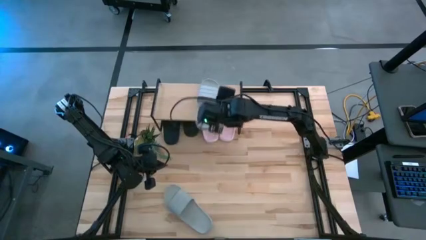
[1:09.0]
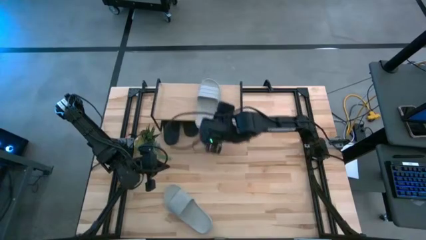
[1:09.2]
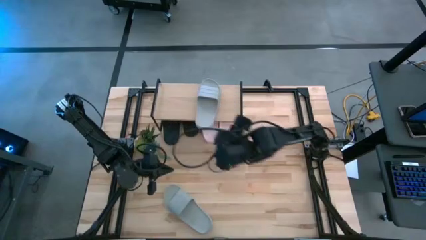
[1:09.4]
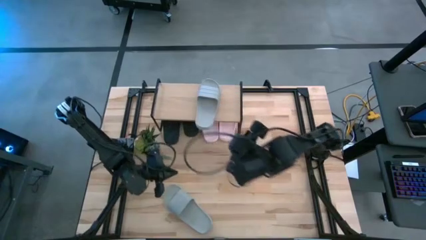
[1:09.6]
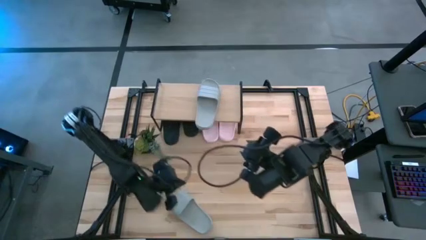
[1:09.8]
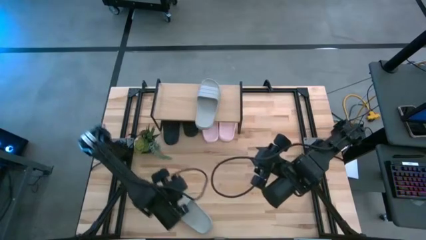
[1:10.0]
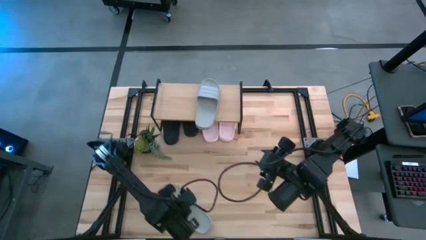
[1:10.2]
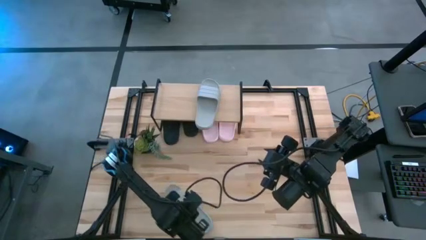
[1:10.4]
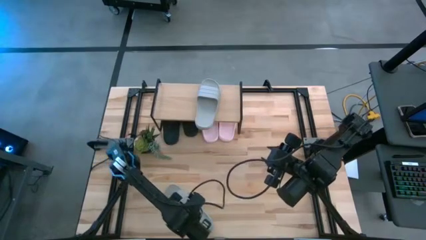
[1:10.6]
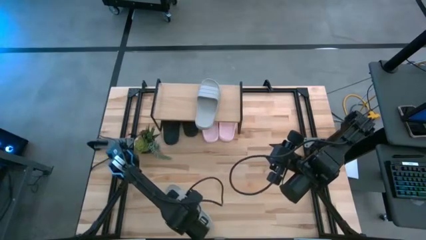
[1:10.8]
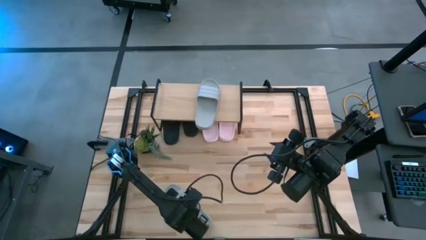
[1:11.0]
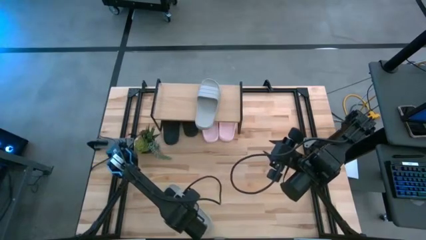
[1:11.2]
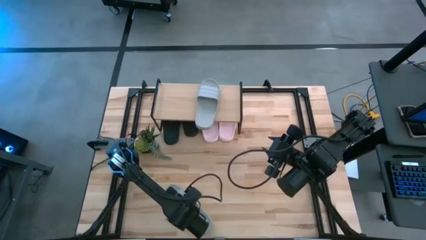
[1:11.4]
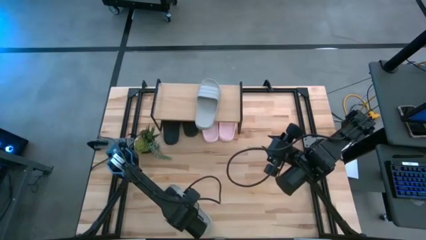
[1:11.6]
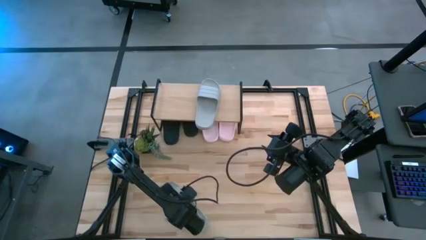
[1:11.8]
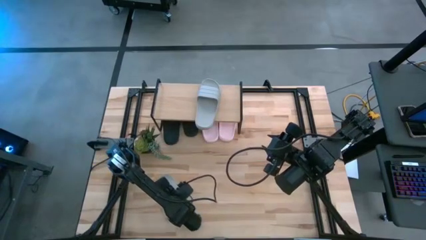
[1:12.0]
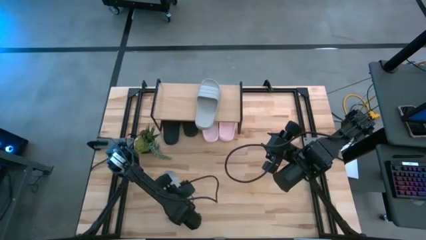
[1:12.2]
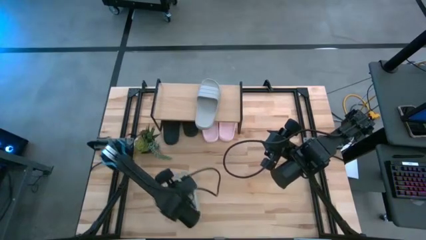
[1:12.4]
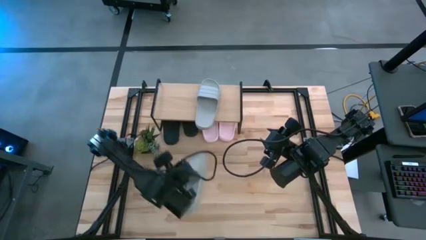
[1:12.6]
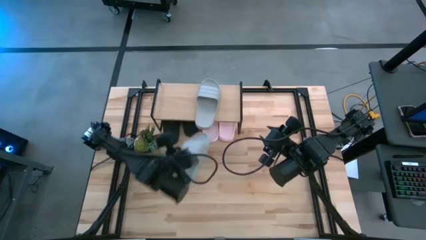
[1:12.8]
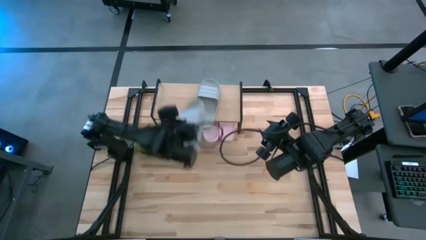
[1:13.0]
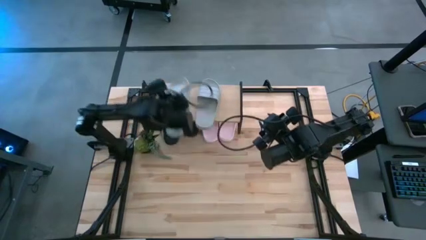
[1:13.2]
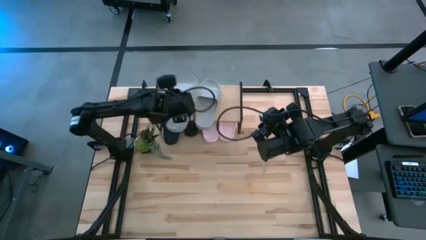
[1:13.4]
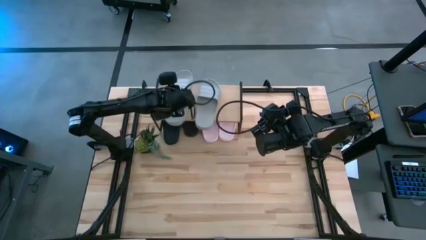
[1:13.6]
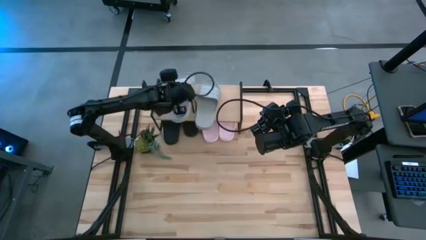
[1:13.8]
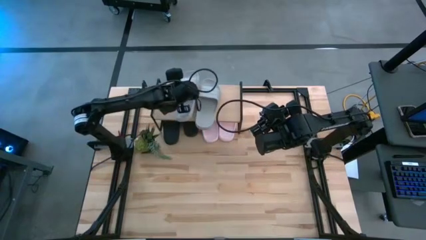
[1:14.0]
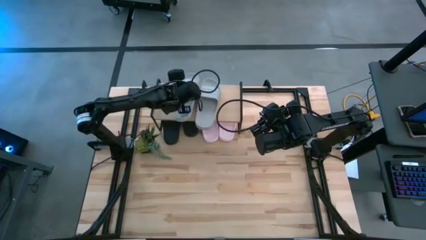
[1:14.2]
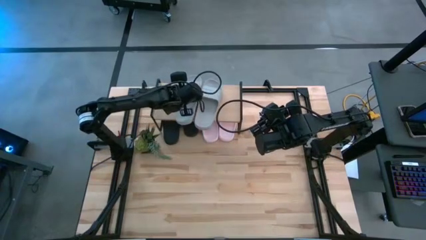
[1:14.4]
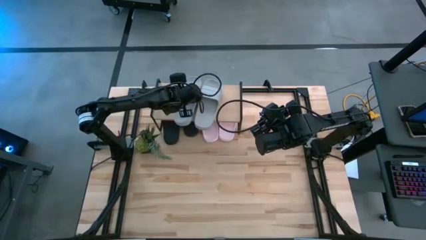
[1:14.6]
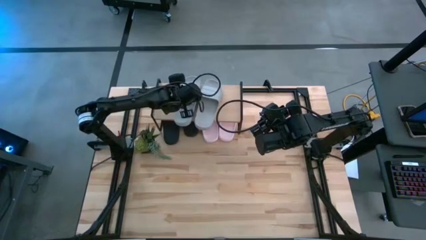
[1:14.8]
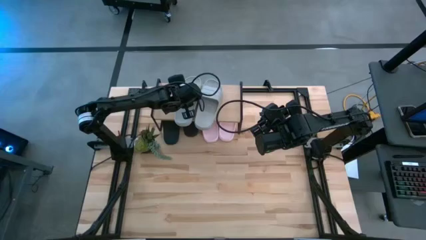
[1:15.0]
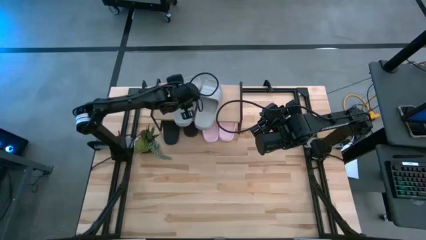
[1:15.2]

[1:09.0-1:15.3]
Task: Pick and place slides into the shelf
Put the gray slide on the shelf

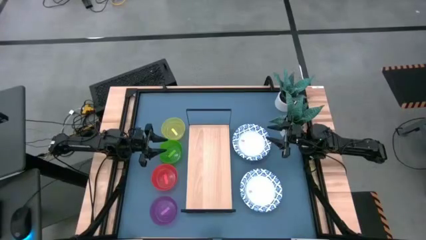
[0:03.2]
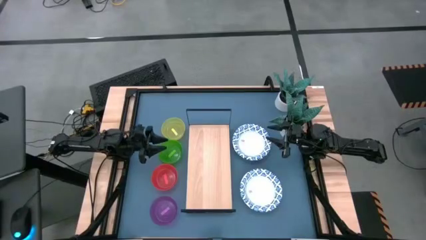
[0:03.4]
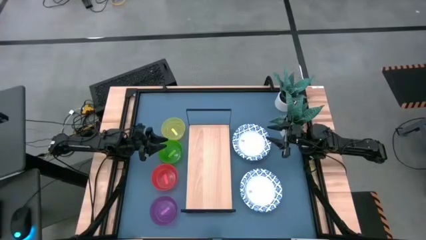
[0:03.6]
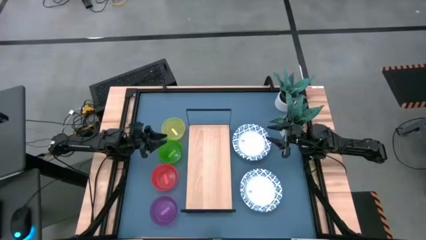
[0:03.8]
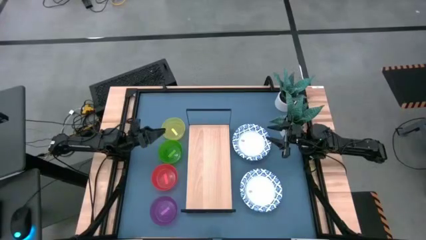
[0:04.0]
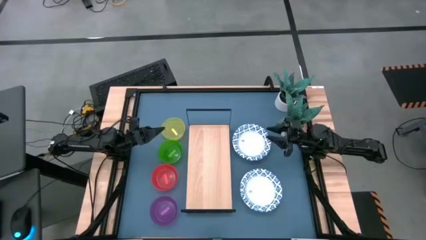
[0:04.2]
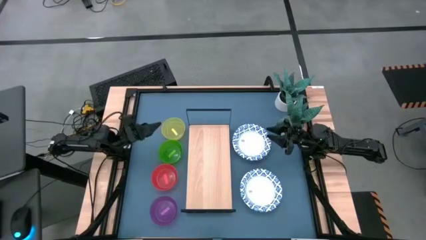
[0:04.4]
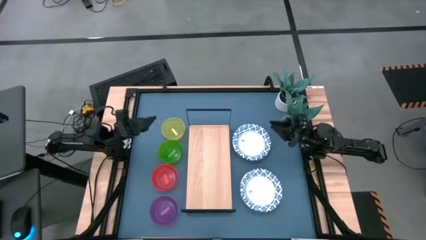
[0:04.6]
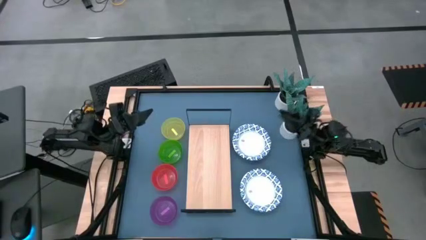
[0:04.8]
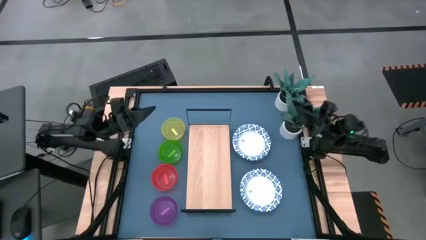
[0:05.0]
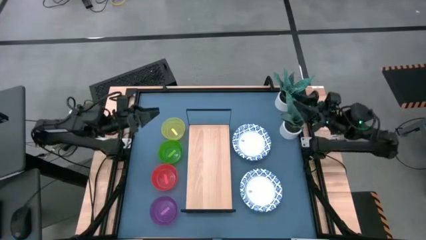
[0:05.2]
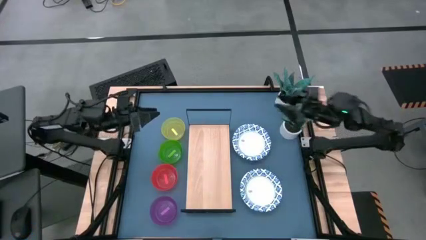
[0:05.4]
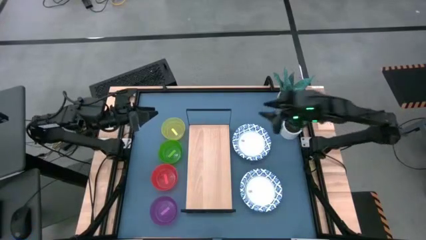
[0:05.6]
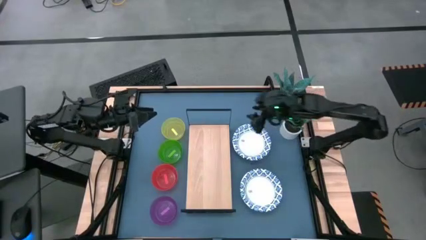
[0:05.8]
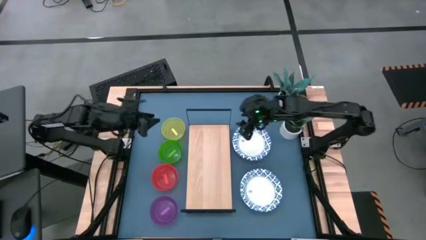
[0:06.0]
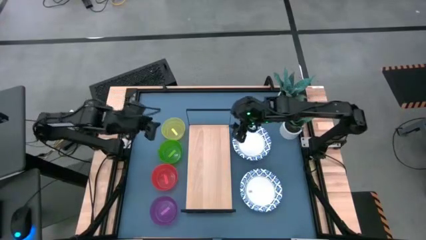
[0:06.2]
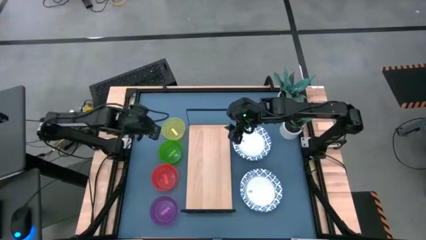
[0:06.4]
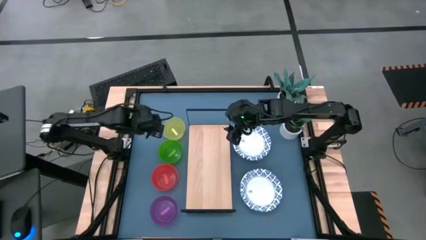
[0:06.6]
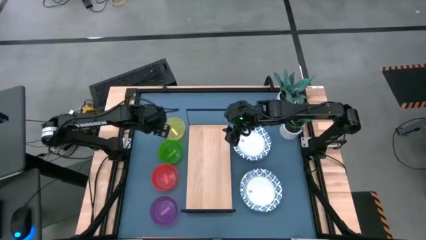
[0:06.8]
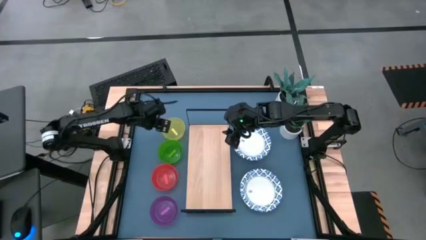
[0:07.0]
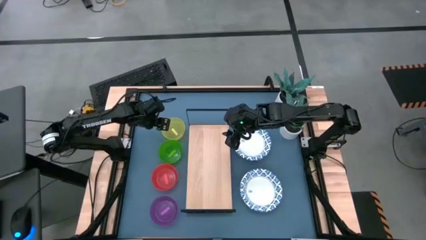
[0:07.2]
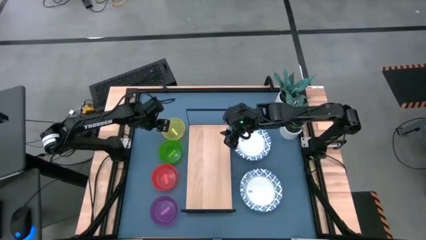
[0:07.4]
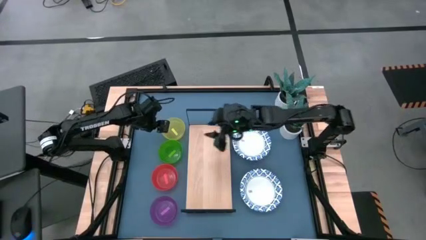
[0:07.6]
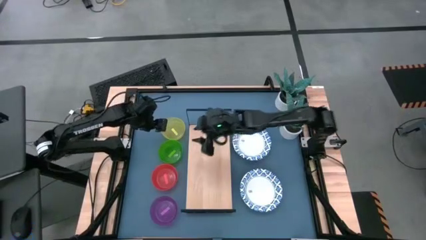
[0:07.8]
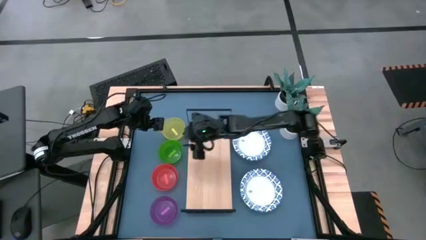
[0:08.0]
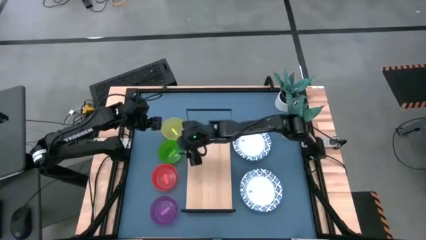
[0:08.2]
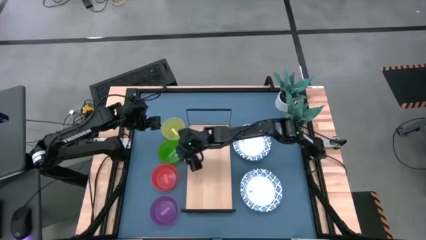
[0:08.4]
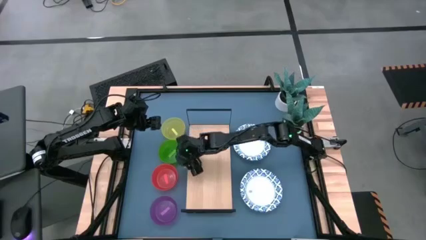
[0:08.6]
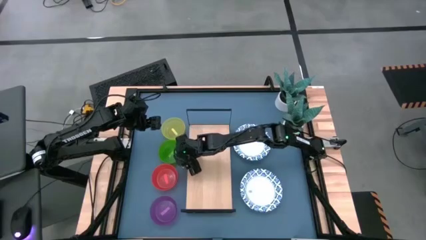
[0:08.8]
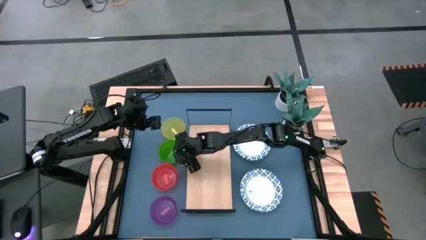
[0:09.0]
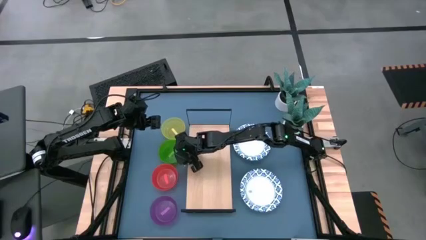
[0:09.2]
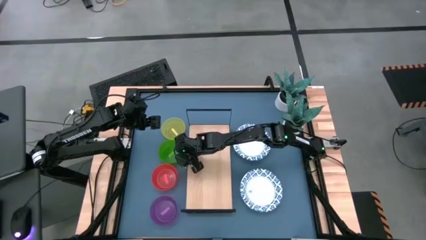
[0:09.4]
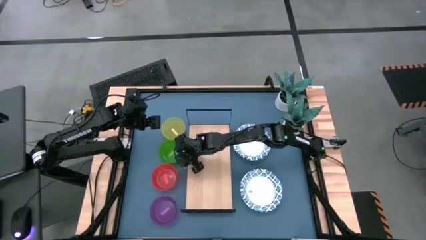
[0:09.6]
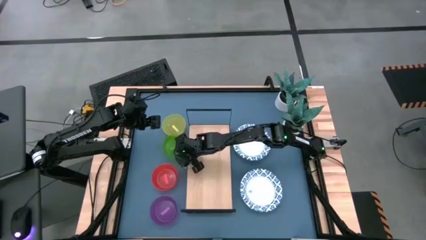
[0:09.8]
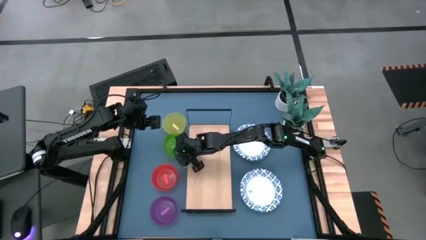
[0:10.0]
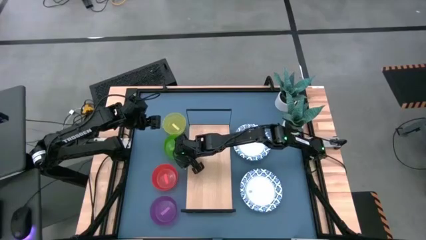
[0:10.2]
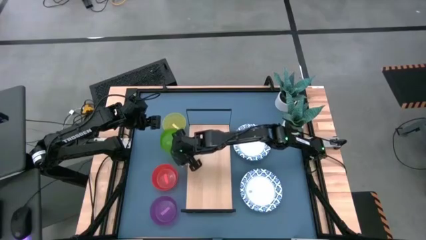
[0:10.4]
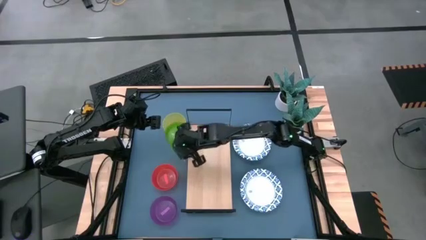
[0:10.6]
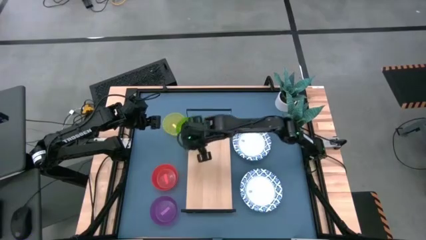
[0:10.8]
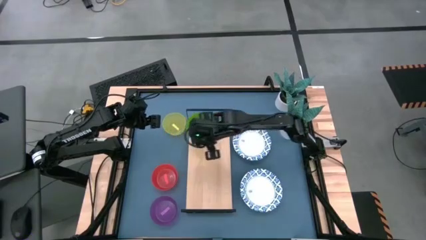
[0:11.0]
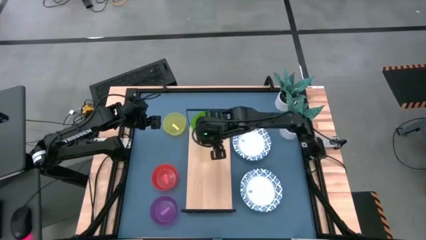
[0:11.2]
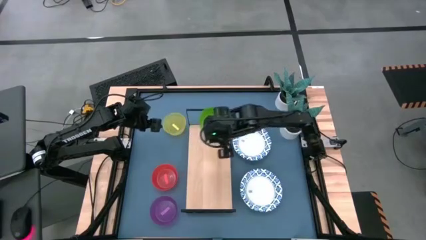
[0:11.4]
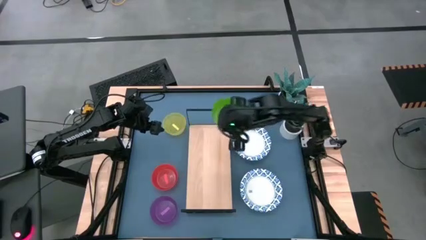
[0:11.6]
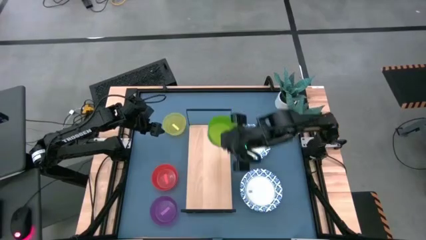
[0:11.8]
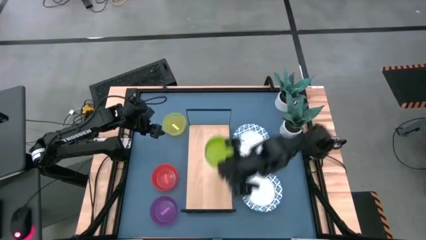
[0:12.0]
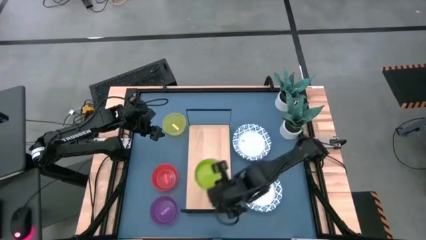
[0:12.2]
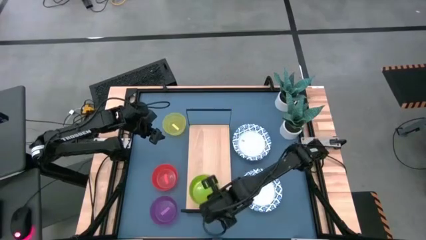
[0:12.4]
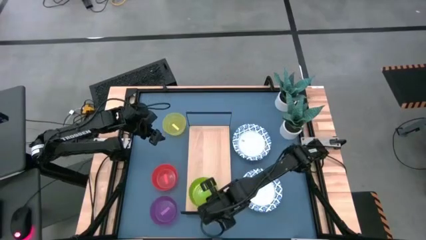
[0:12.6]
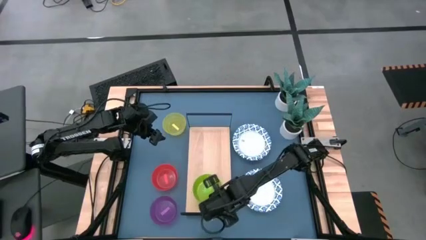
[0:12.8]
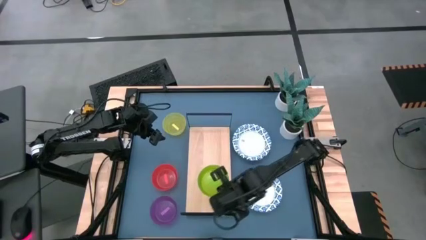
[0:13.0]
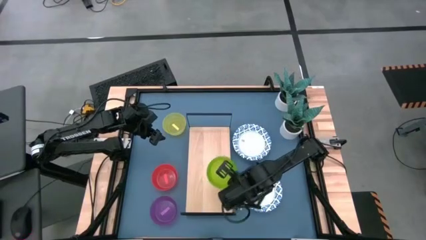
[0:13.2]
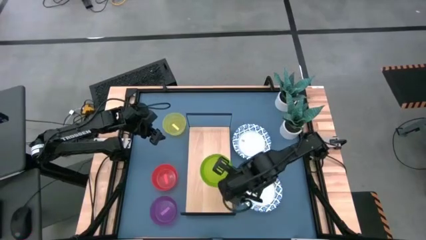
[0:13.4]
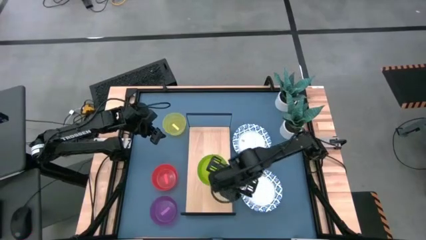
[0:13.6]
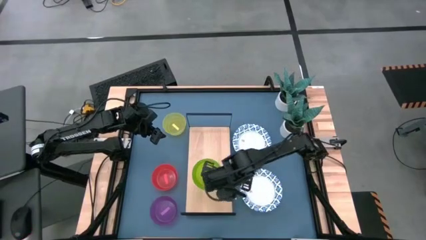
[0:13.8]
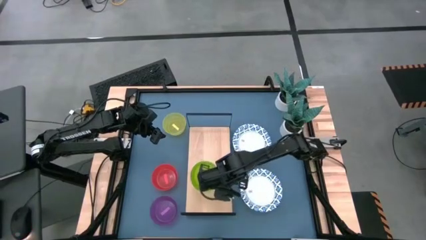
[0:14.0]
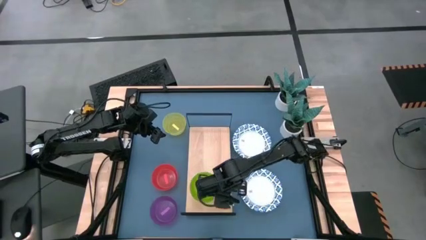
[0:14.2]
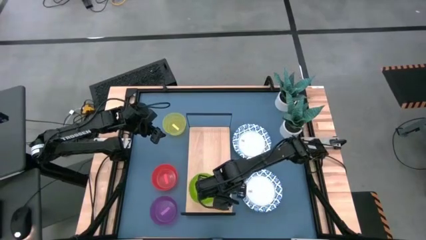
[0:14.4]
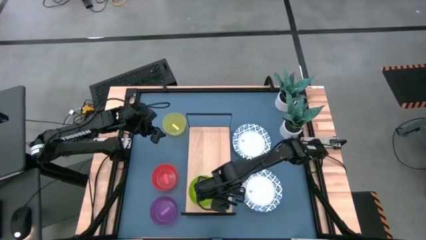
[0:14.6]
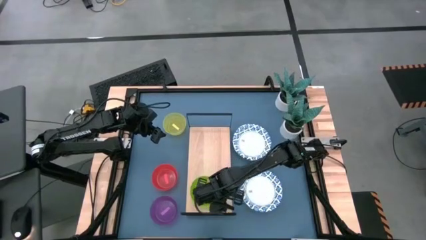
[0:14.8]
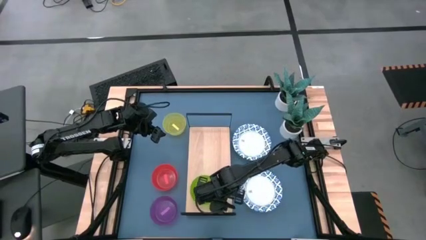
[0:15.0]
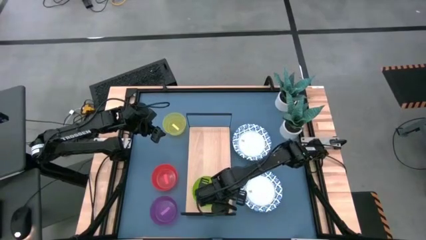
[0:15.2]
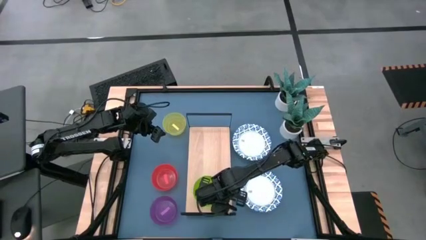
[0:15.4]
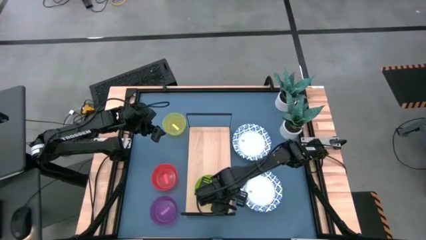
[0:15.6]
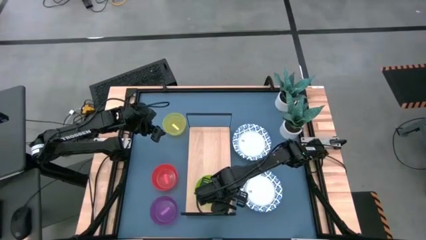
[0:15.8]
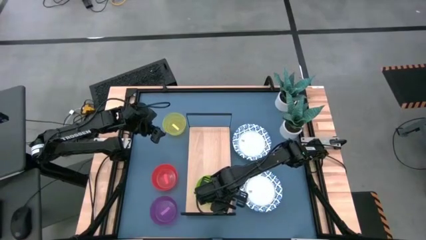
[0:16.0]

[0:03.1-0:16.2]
Task: Place and stack bowls onto a shelf
Put the green bowl on the shelf
